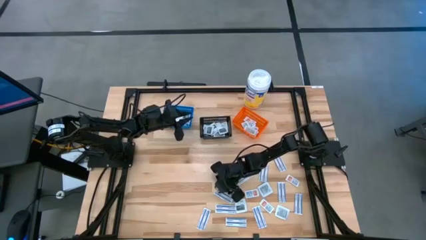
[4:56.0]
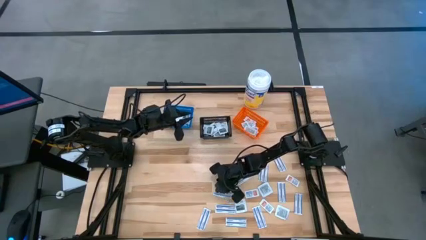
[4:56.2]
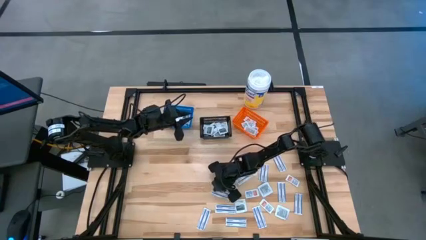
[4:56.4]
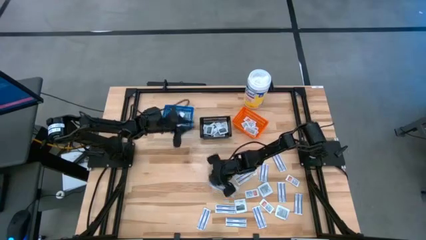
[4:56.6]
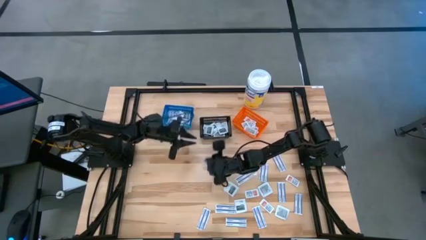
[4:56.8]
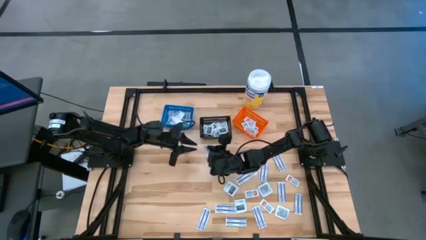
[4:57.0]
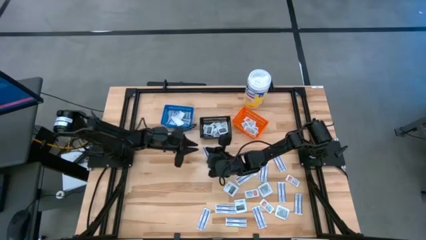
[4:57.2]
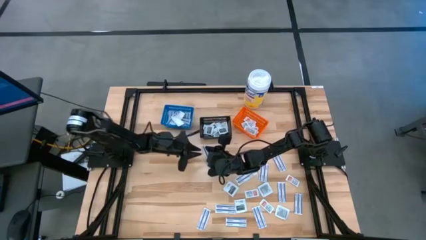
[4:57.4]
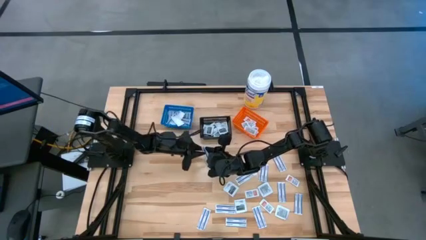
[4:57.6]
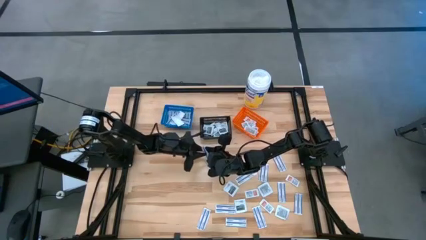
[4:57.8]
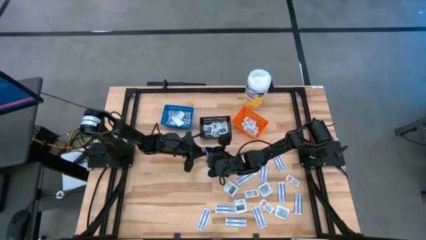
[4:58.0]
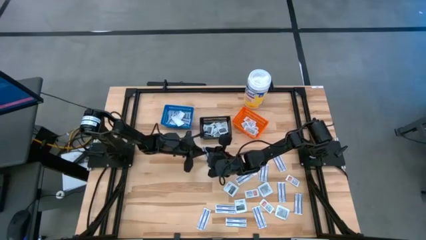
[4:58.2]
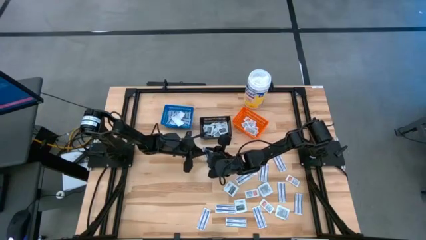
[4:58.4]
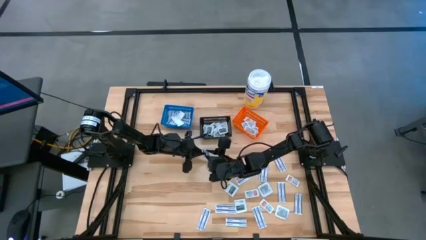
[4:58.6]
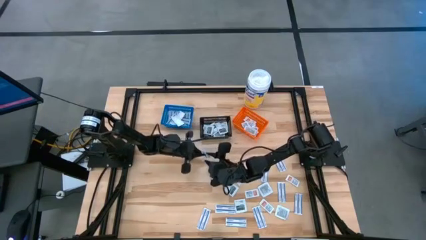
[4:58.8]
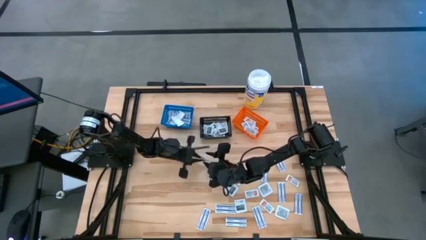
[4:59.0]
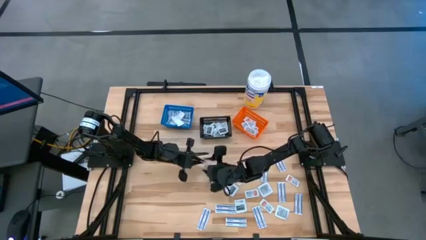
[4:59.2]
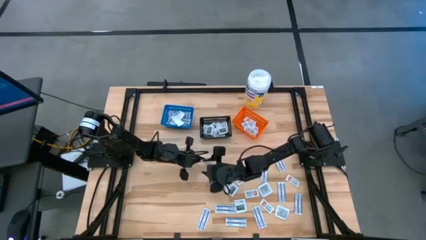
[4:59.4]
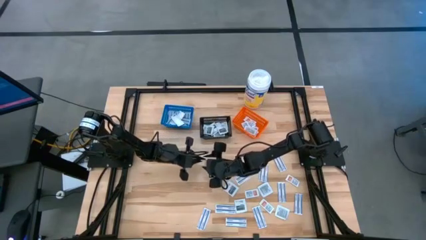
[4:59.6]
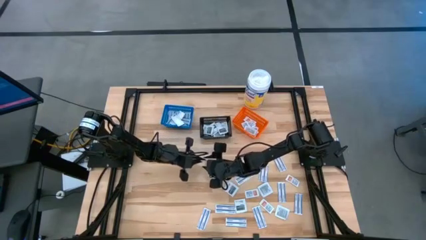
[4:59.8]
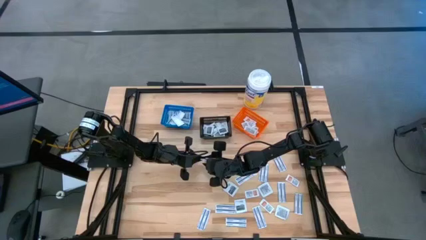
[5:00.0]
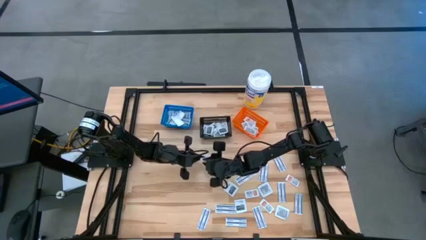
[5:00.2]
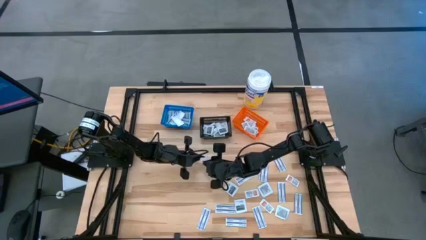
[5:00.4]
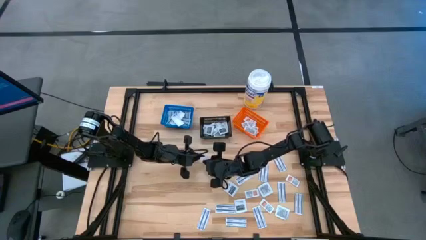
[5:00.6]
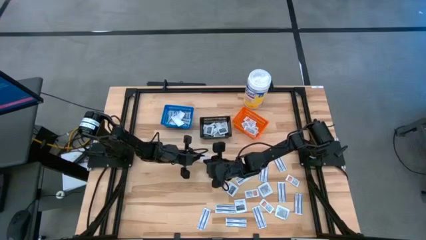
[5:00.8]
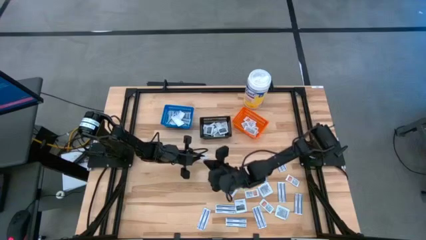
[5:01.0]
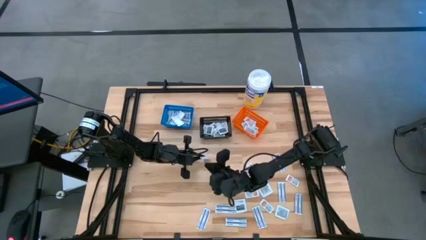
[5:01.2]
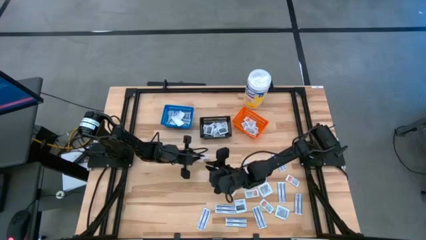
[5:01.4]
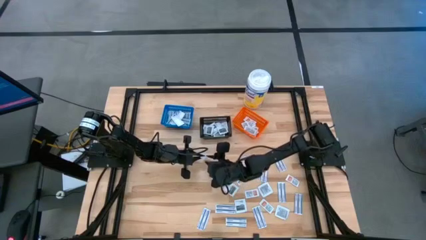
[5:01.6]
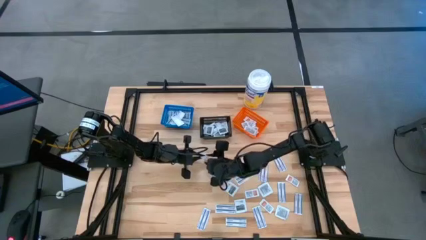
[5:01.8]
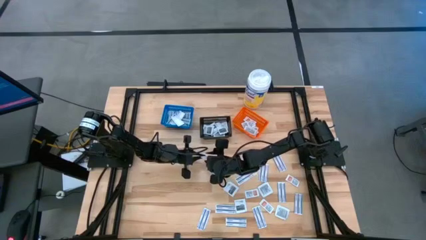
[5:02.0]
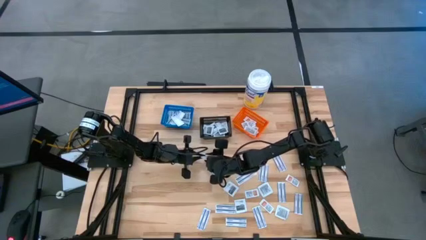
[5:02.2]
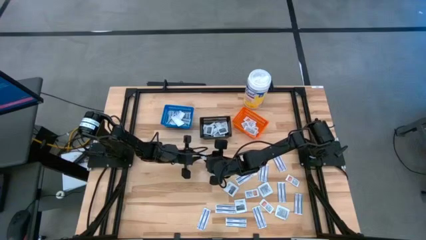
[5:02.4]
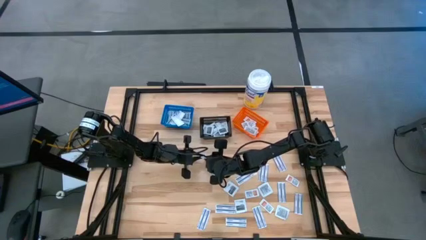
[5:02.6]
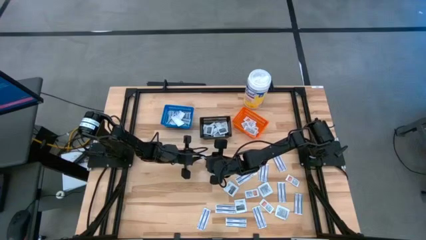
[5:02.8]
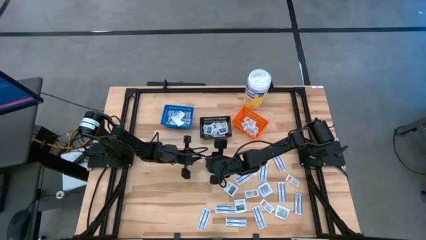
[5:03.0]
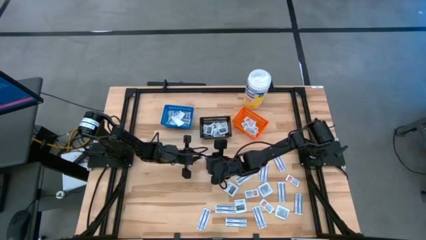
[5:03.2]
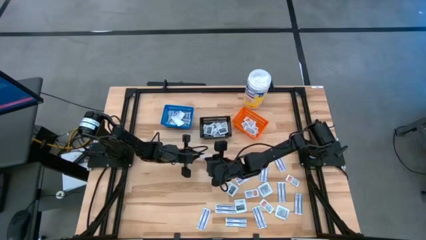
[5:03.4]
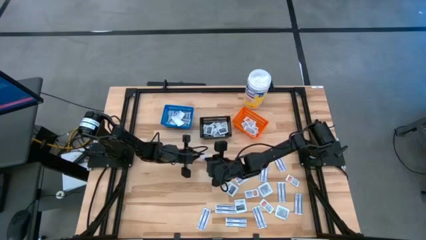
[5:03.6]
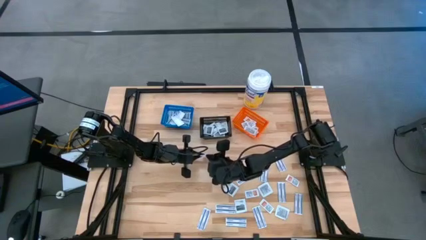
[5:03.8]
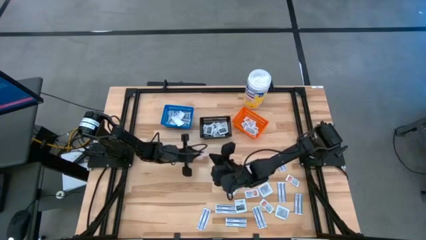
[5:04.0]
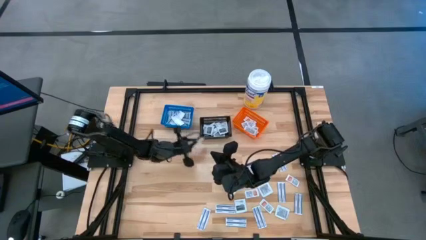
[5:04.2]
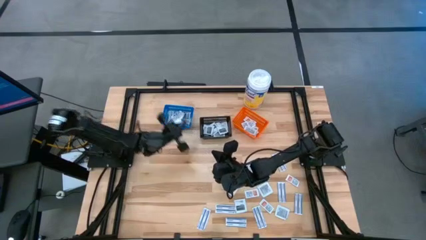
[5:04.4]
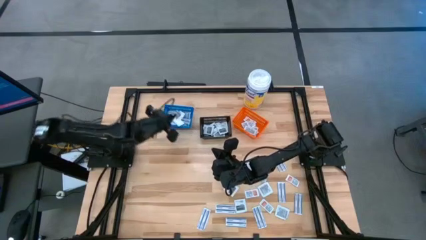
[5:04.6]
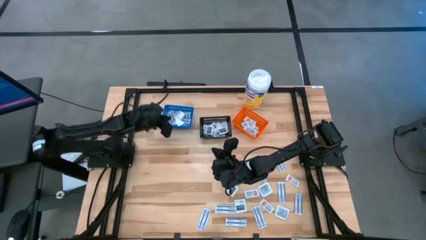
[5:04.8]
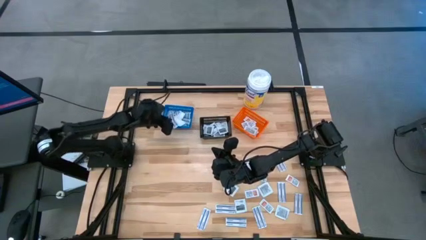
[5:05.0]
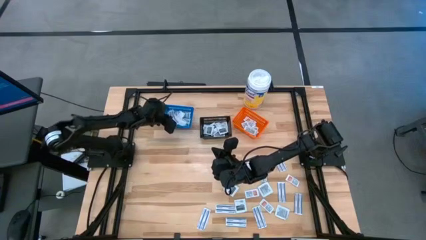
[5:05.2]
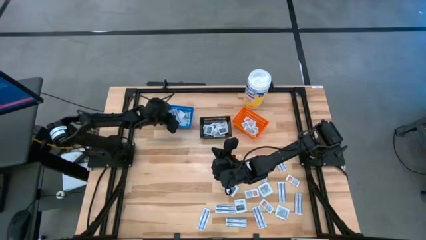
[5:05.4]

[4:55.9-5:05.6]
Task: Pick & Place First Aid Supplies
Put the bandage into the blue container

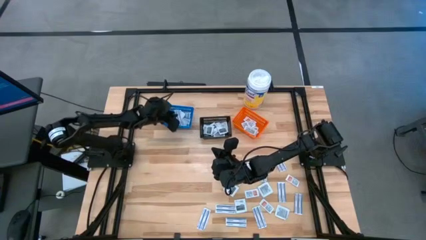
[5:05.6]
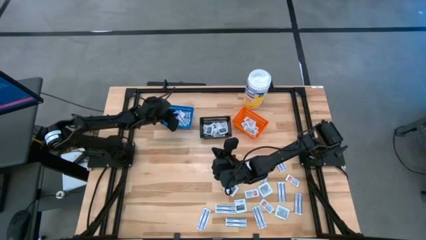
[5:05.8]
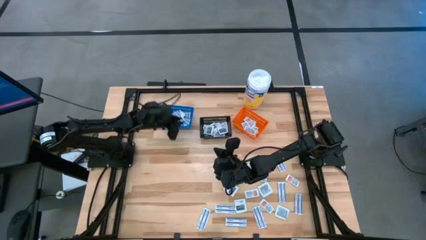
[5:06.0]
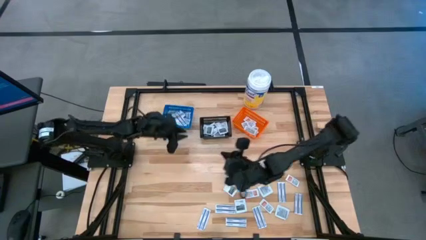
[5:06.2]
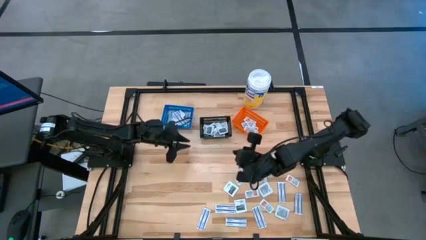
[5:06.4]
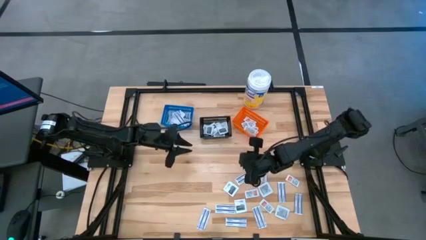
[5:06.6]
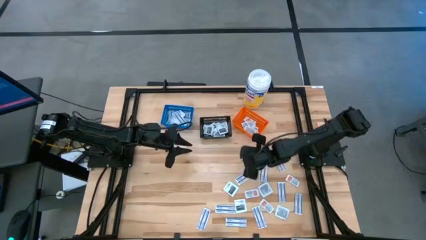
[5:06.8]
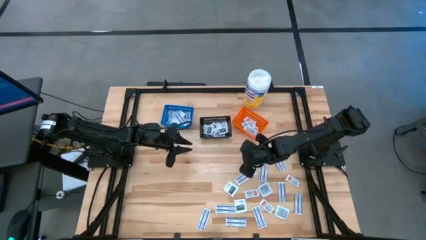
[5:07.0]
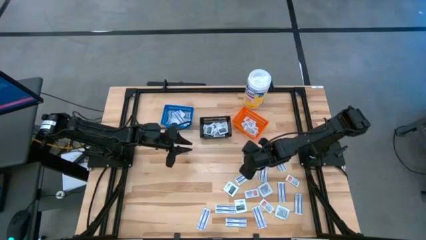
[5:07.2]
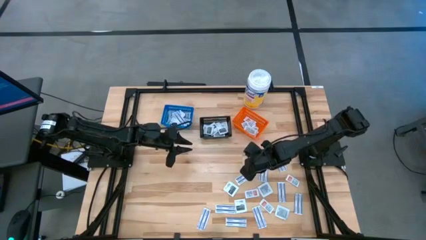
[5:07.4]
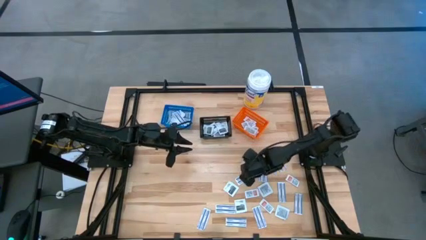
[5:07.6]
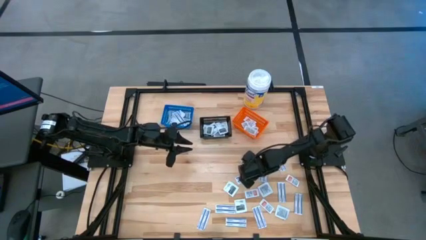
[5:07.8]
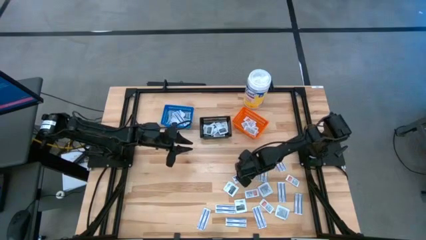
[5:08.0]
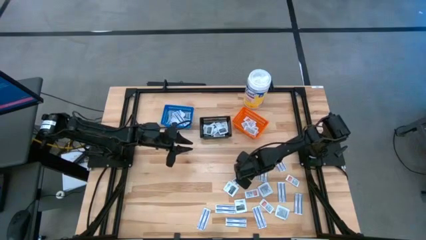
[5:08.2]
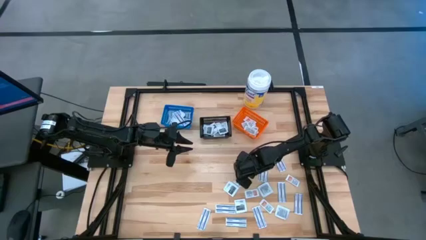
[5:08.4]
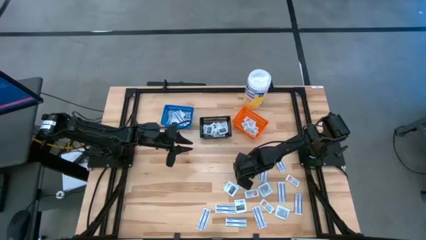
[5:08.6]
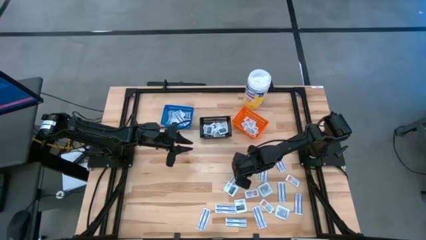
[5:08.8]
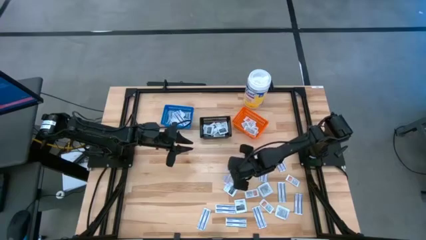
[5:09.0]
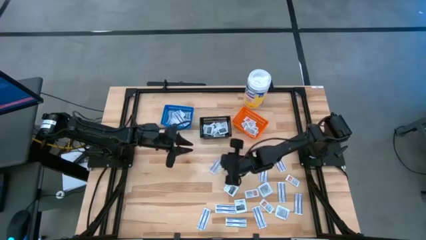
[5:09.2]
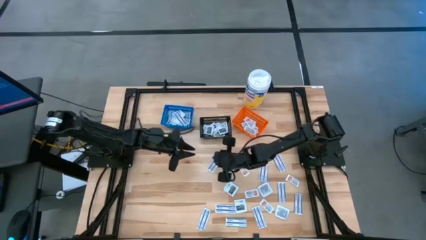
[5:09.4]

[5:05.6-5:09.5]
Put the bandage into the blue container

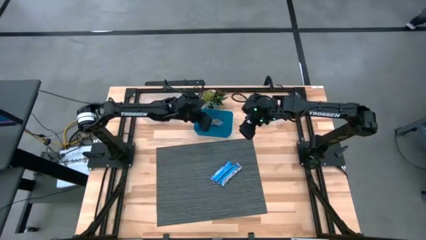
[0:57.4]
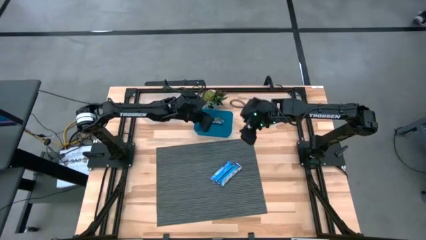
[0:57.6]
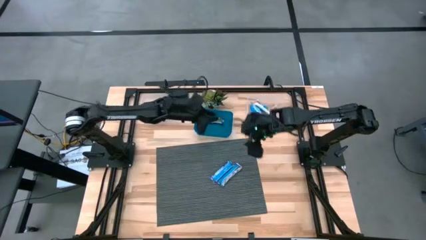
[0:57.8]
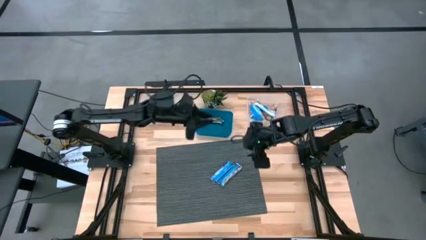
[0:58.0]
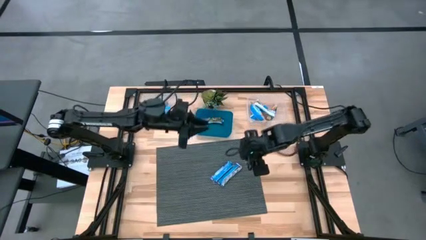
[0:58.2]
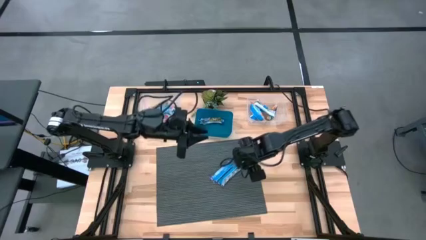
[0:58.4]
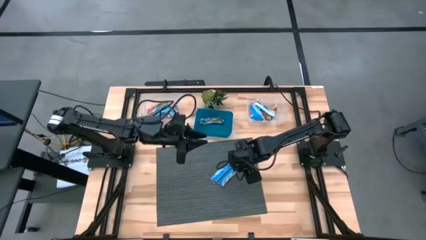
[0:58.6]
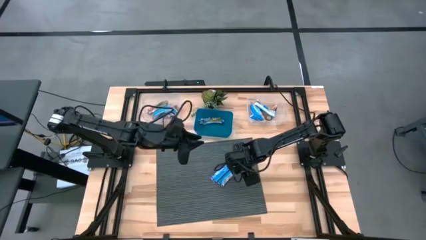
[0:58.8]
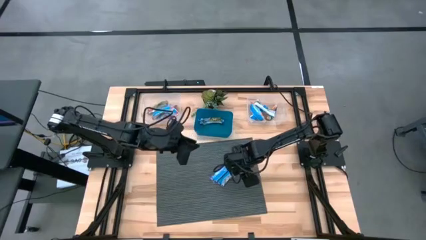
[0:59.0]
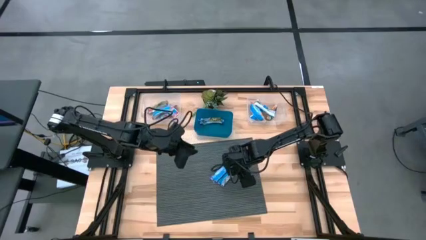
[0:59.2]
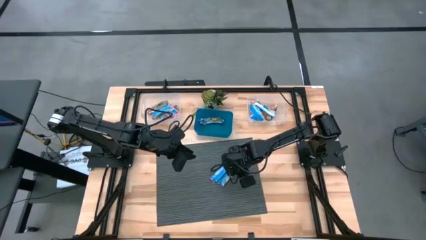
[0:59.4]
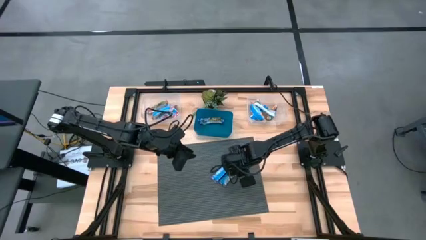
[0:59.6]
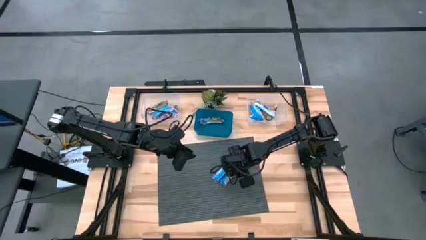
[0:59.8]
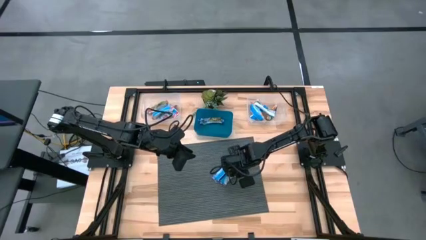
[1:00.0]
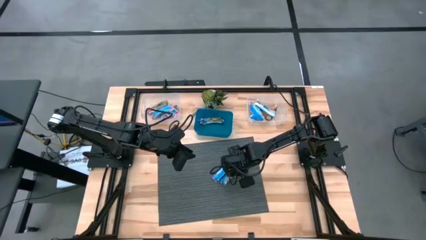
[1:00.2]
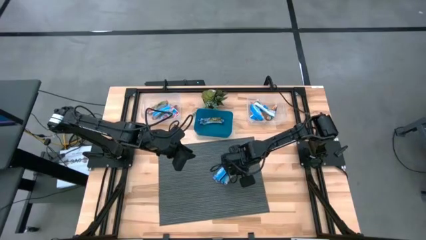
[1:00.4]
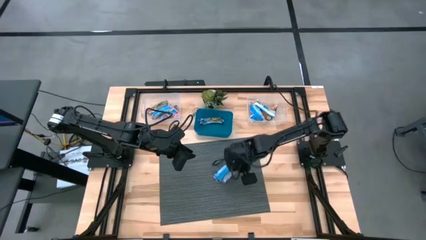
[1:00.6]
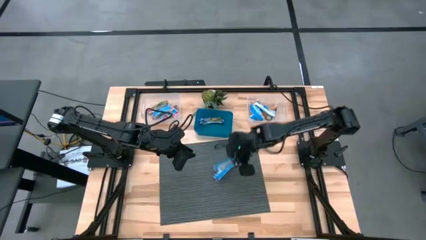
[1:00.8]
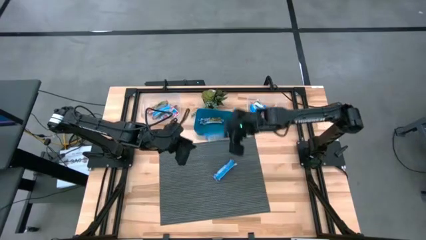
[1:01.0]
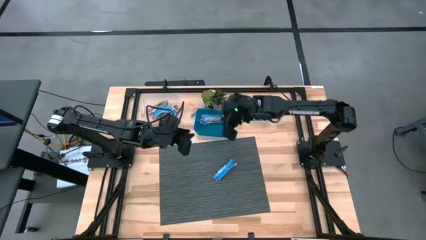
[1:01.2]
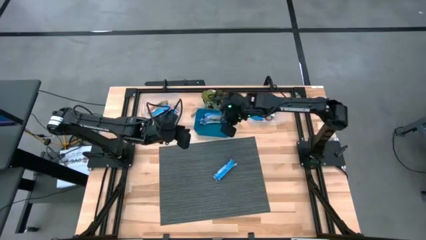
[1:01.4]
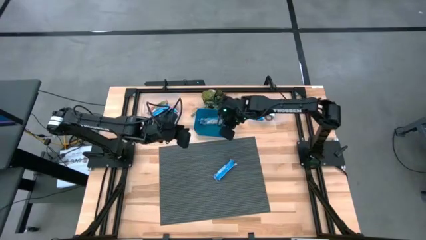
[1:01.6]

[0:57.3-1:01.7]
Task: Pick and place Granola Bars by type
Put the blue granola bar into the blue bin
